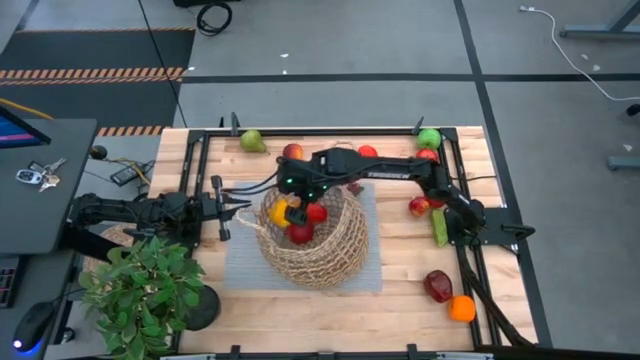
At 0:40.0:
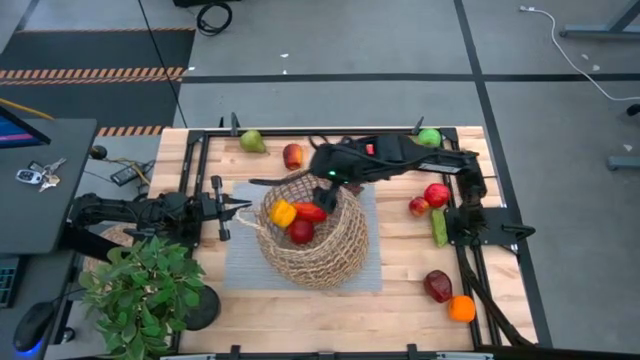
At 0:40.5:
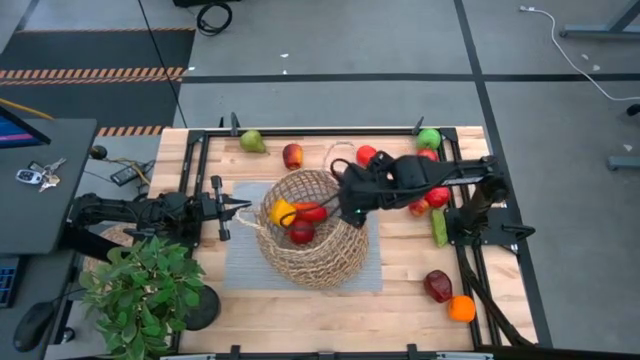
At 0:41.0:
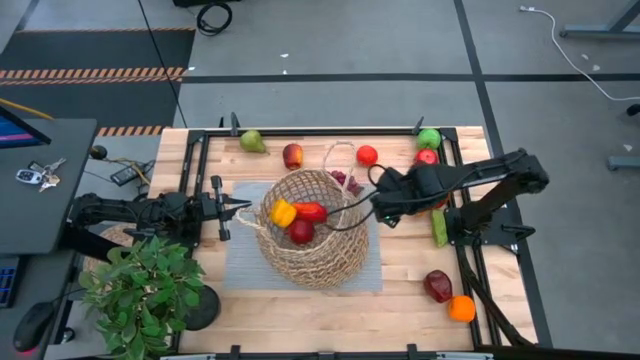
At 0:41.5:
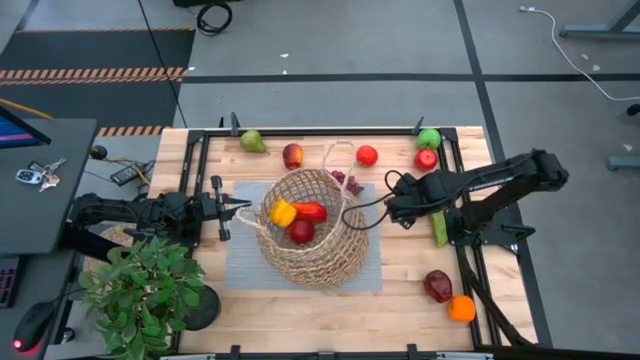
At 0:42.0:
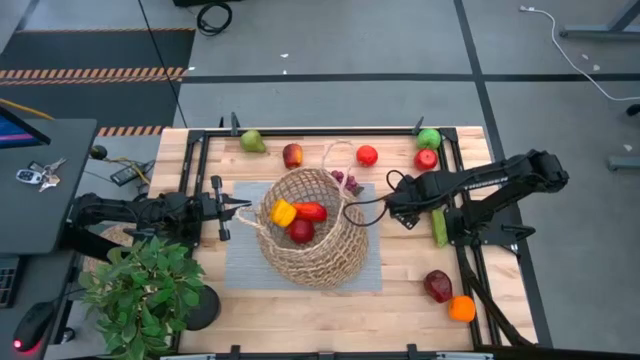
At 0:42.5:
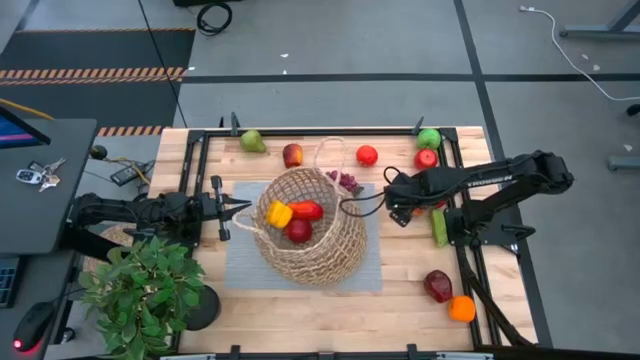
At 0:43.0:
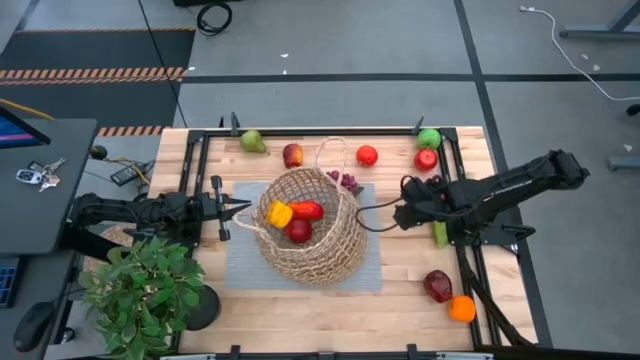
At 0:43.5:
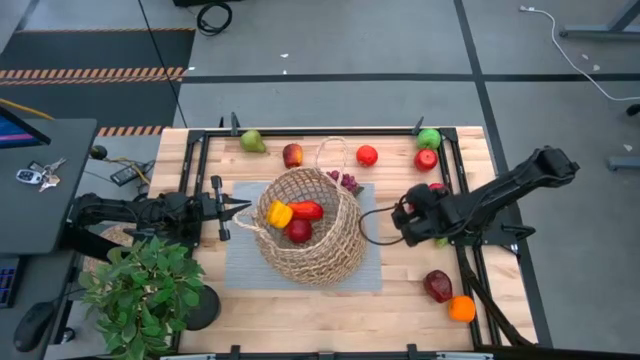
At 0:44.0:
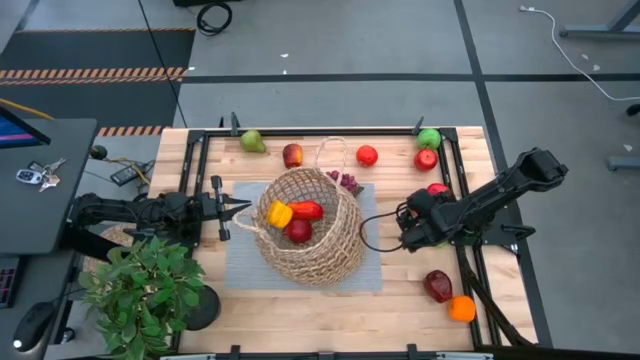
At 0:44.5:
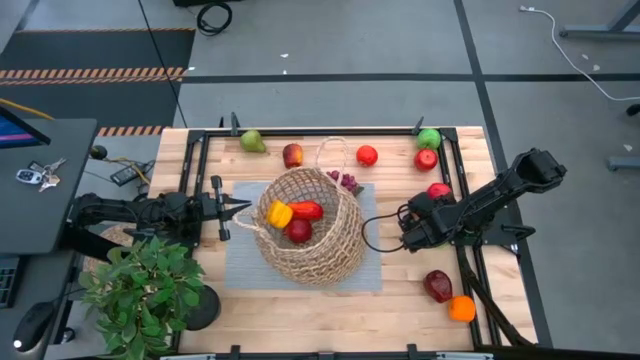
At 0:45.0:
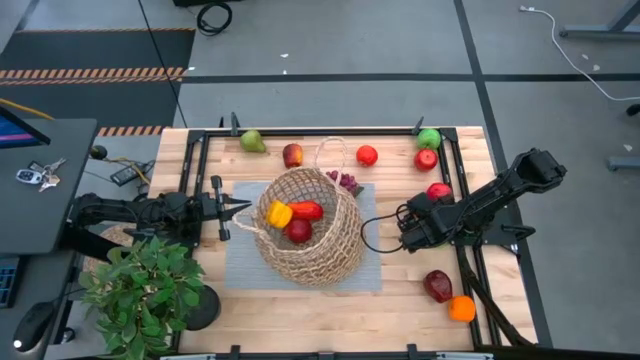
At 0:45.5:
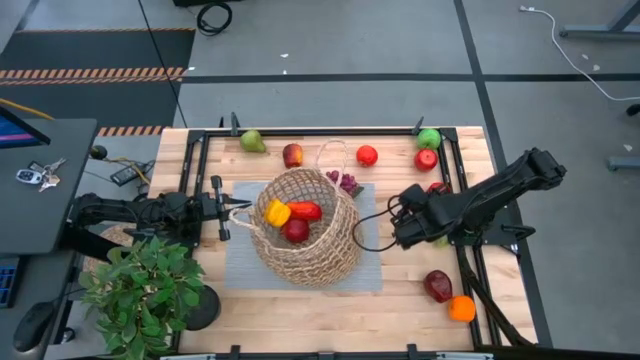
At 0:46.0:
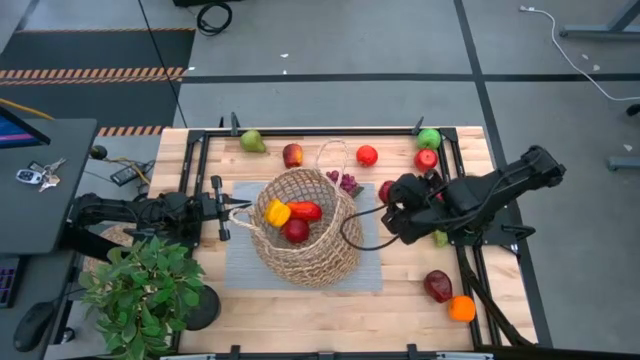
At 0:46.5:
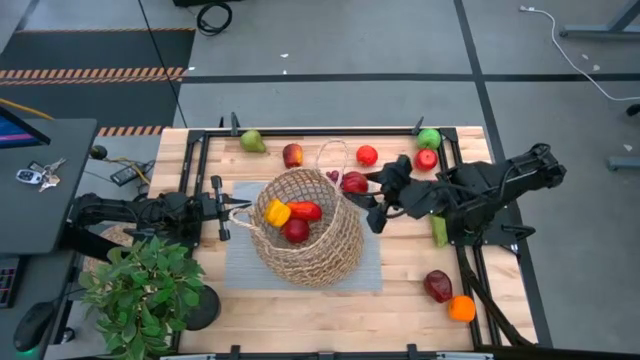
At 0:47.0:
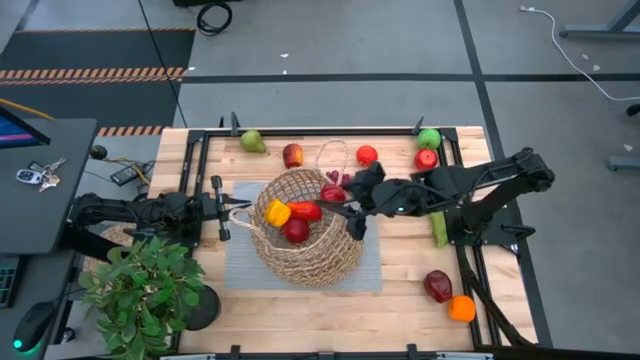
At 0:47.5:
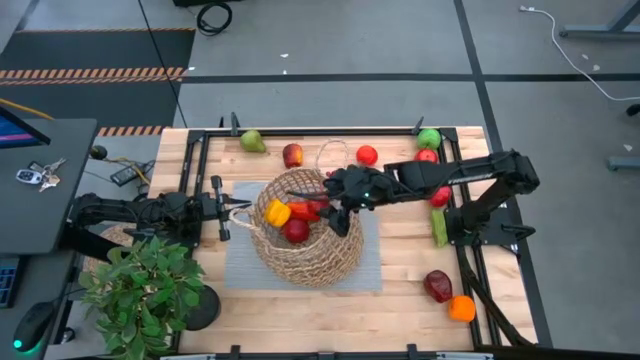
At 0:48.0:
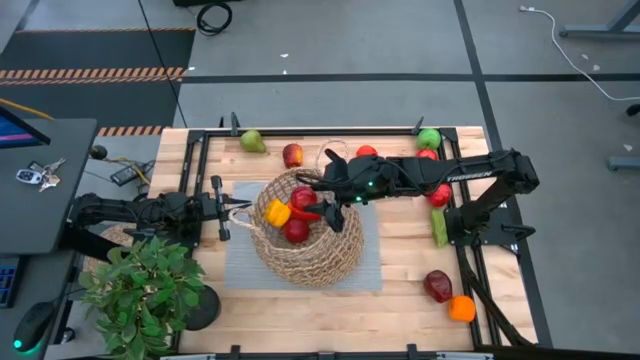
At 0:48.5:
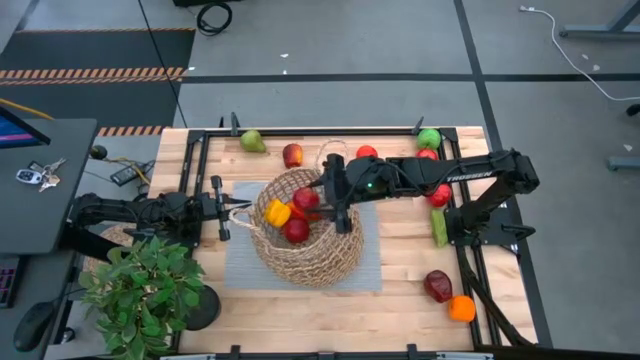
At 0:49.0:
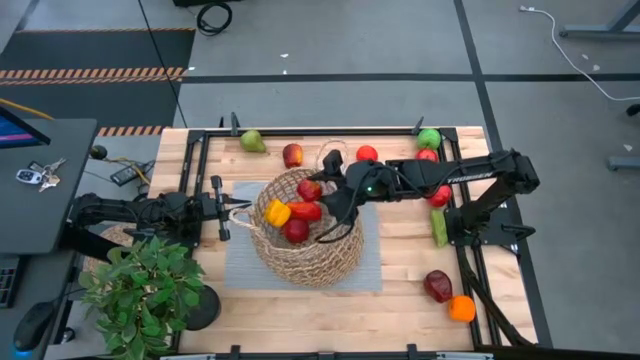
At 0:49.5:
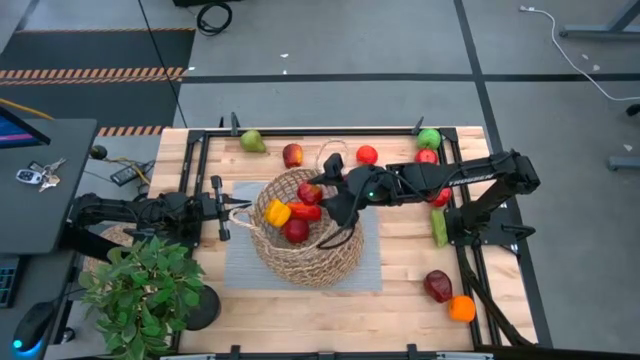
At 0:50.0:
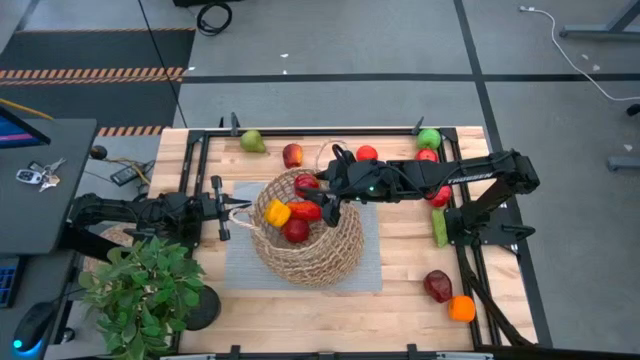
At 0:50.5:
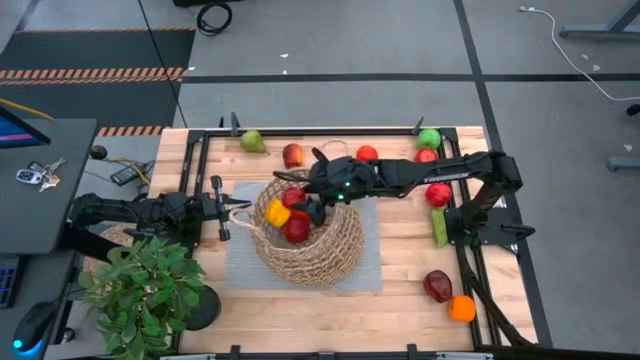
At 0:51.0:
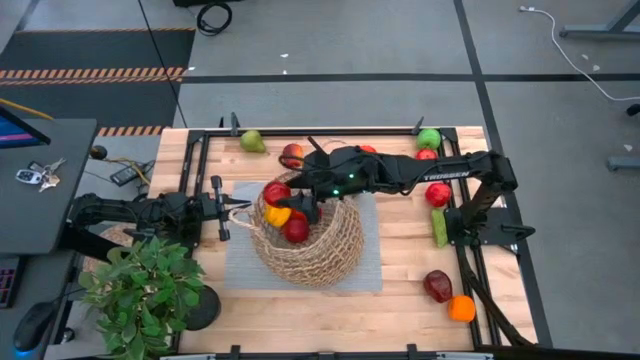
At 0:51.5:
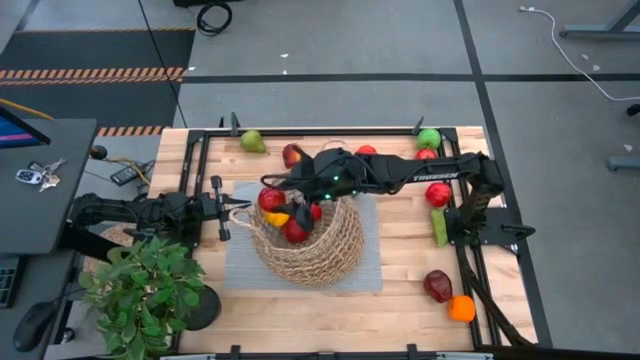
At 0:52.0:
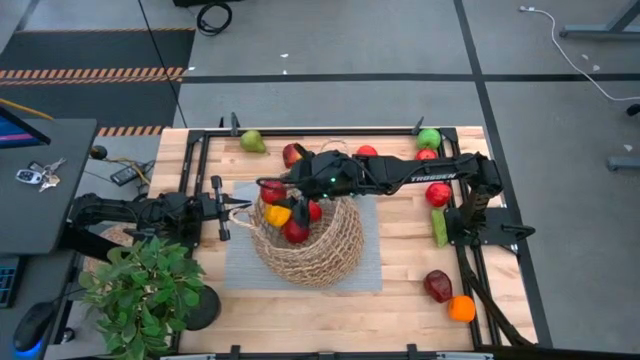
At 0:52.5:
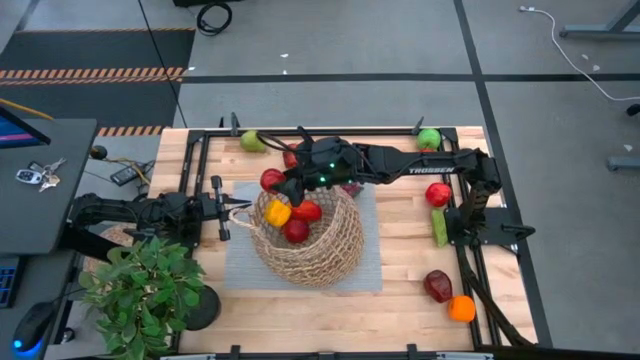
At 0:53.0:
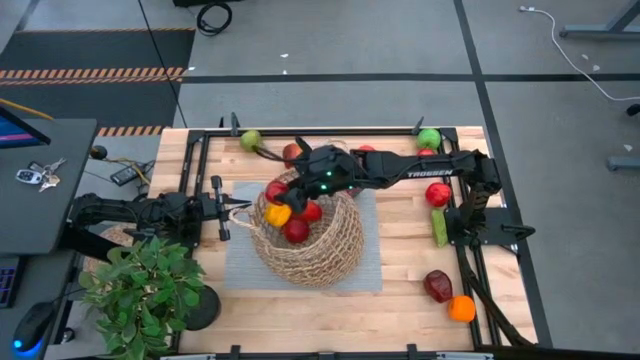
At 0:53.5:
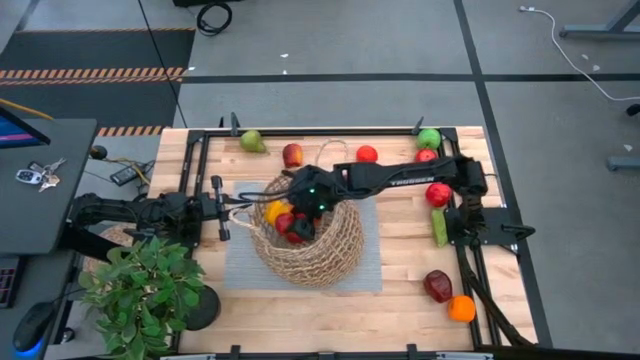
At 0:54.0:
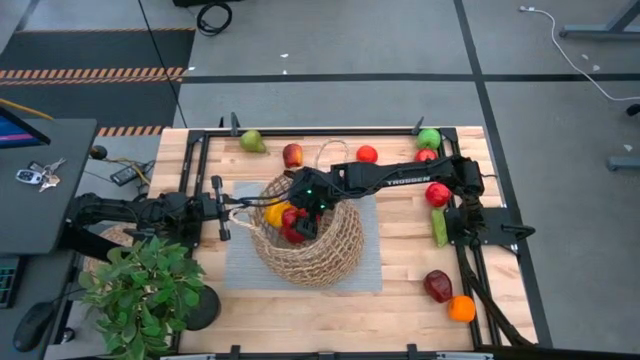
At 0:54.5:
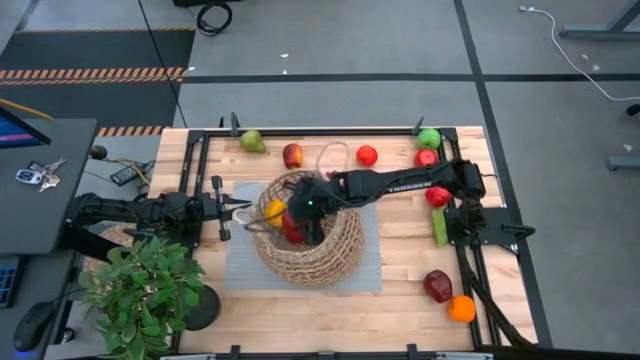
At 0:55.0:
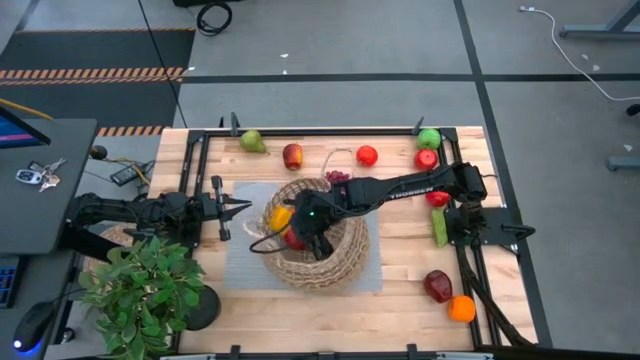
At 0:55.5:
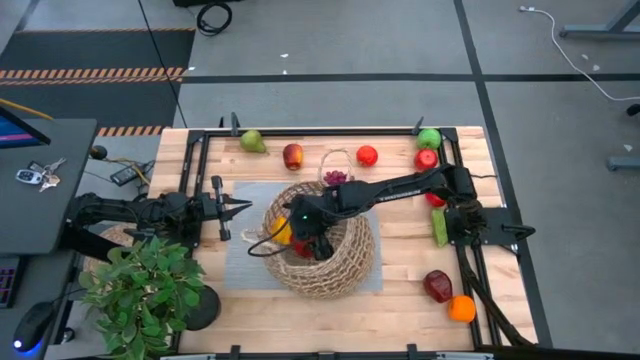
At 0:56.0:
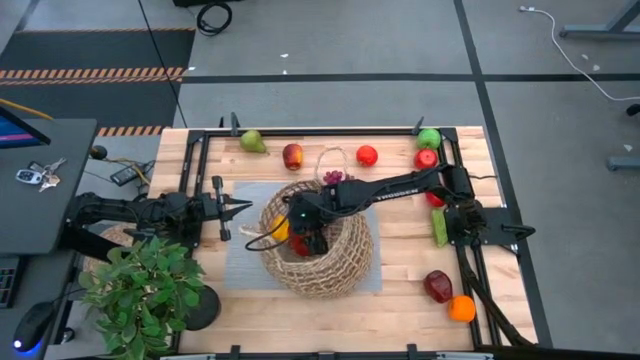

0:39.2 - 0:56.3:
Task: Build produce basket
Put the red apple into the brown basket

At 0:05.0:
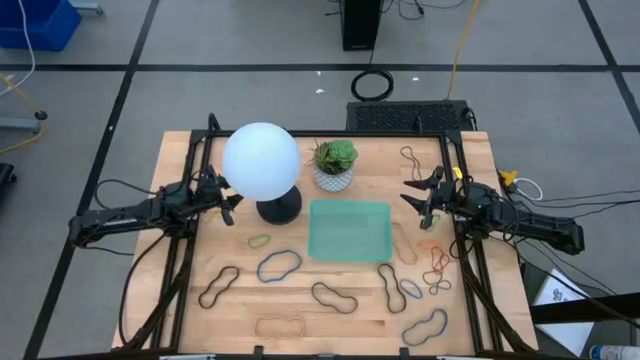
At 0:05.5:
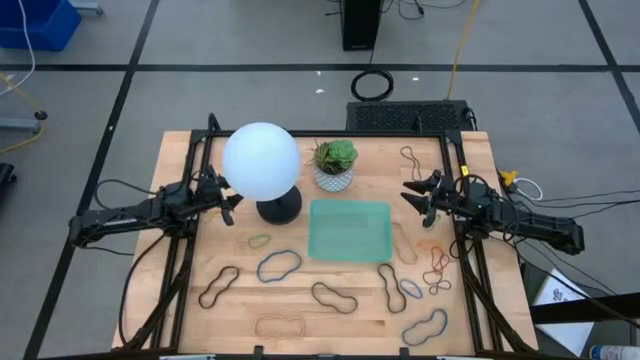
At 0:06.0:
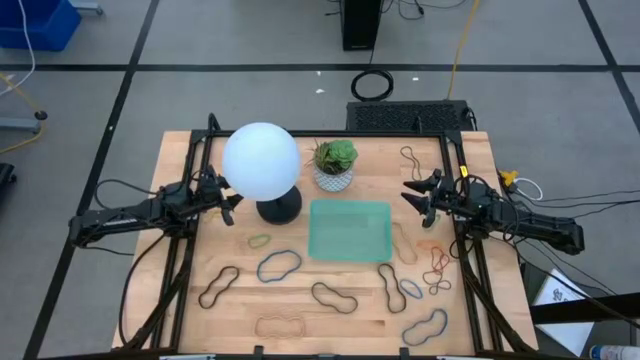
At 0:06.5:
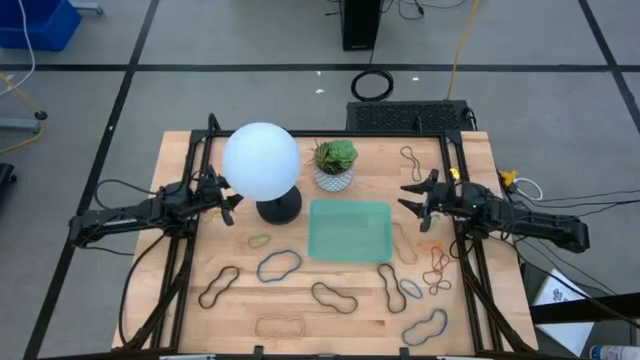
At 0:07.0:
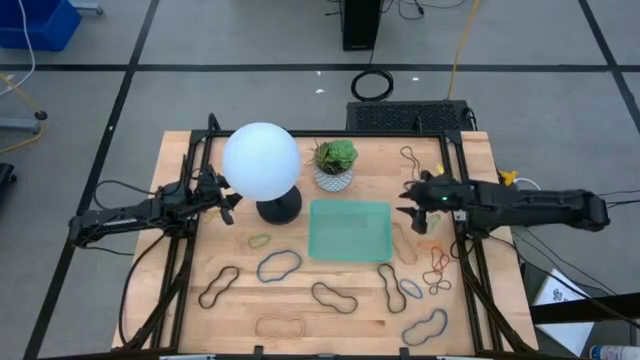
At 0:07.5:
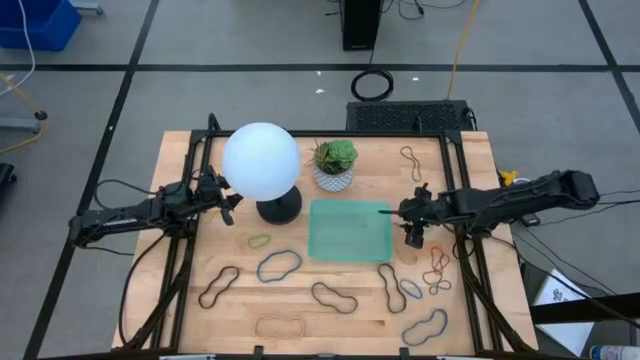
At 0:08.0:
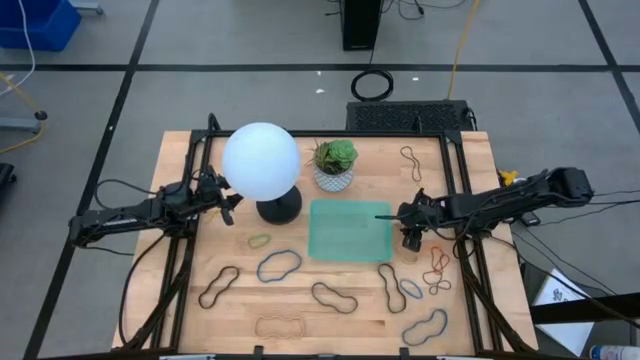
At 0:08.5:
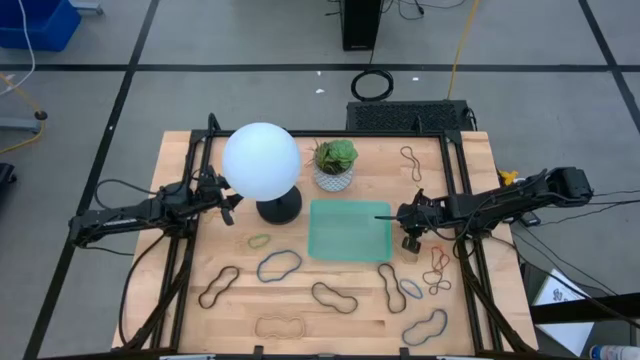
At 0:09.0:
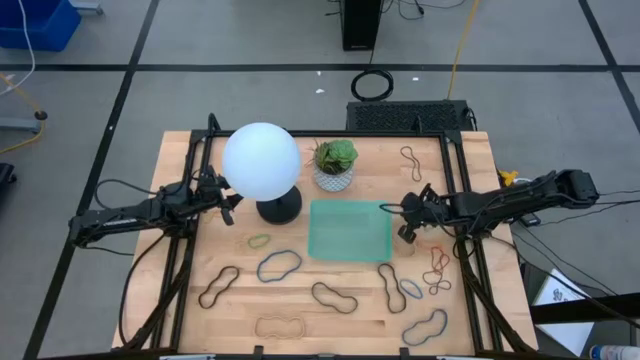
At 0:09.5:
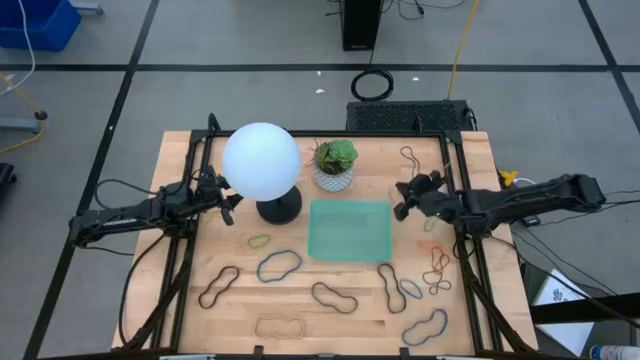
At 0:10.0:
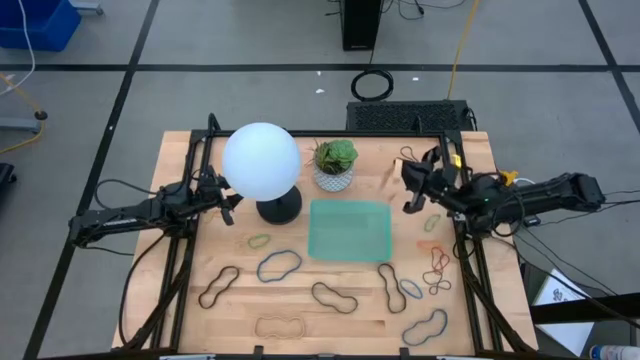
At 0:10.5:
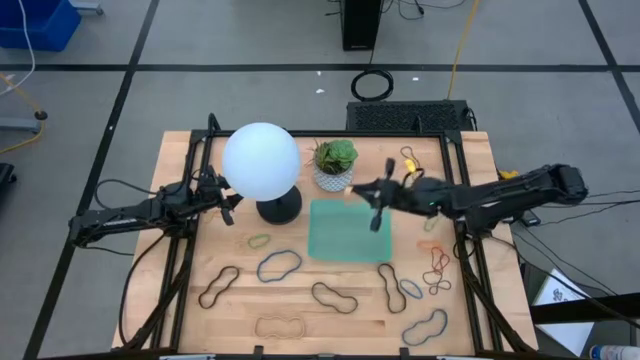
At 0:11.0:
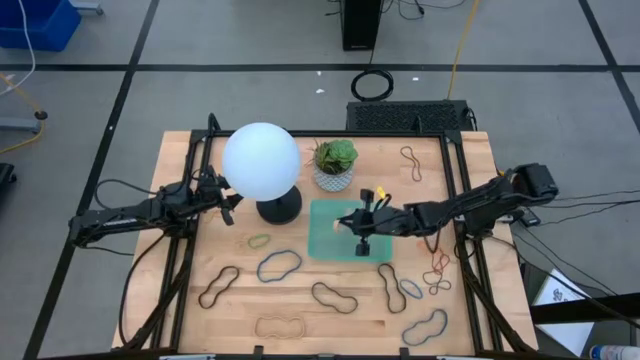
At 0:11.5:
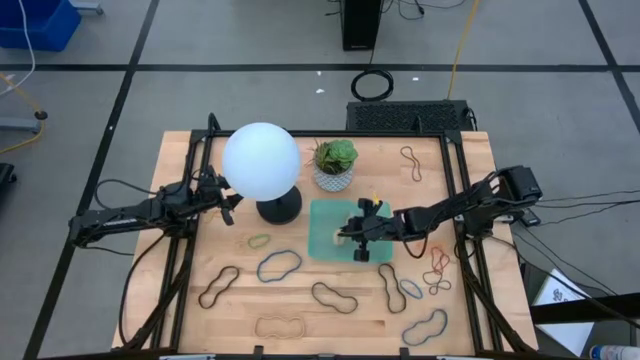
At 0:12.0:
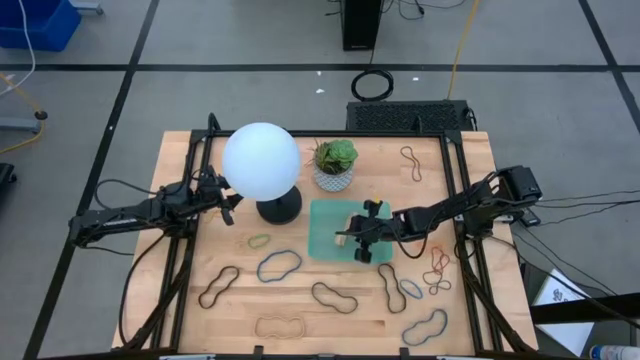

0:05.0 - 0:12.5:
Task: Pick and place rubber bands into bin
Put the top brown rubber band into the blue bin
